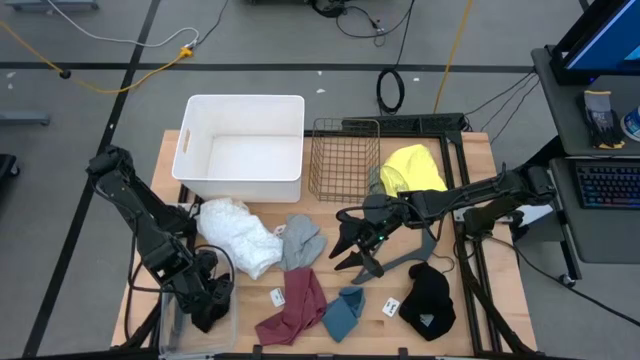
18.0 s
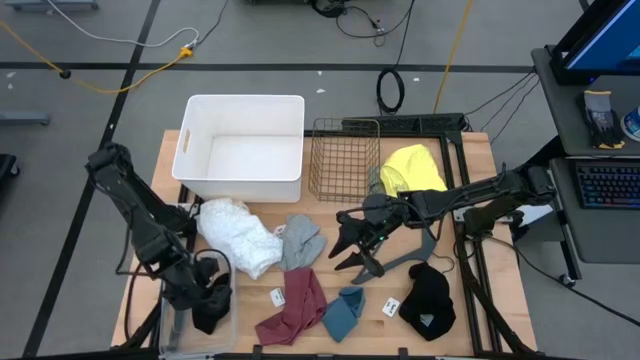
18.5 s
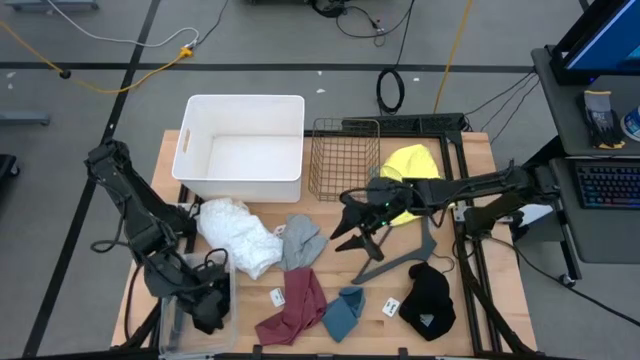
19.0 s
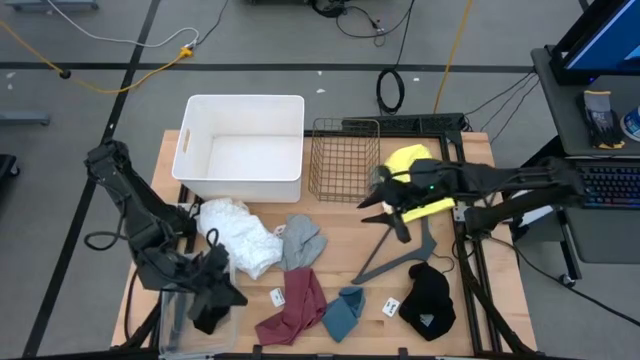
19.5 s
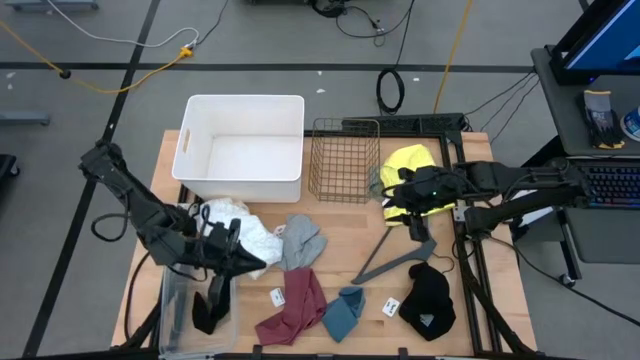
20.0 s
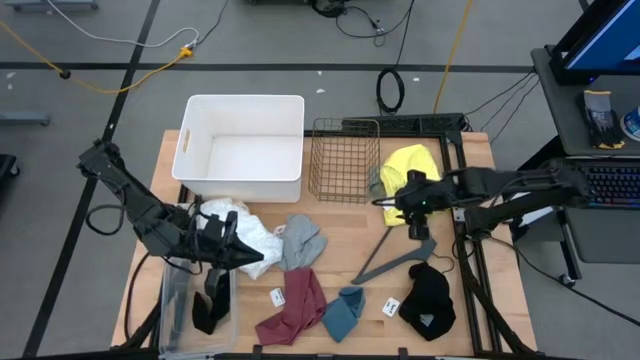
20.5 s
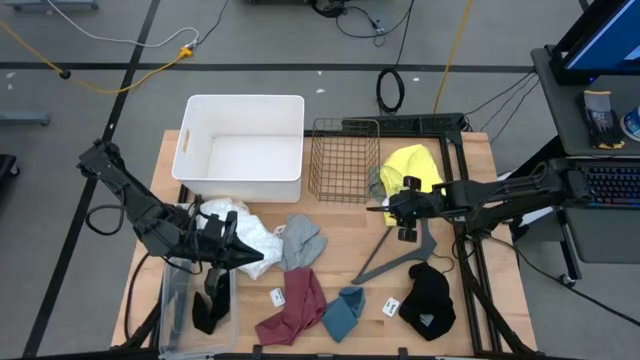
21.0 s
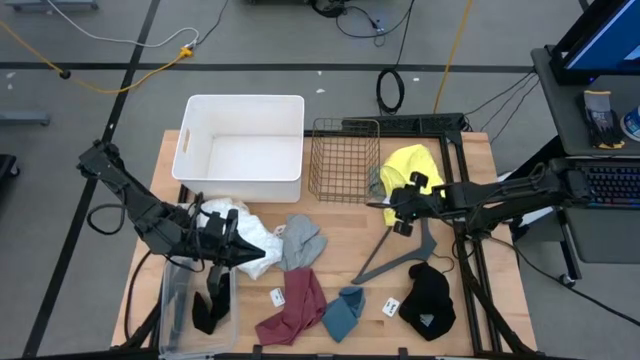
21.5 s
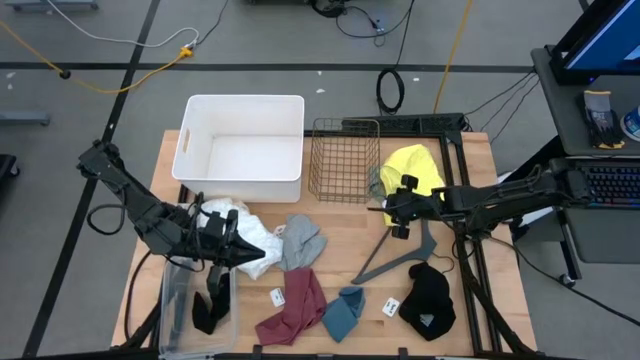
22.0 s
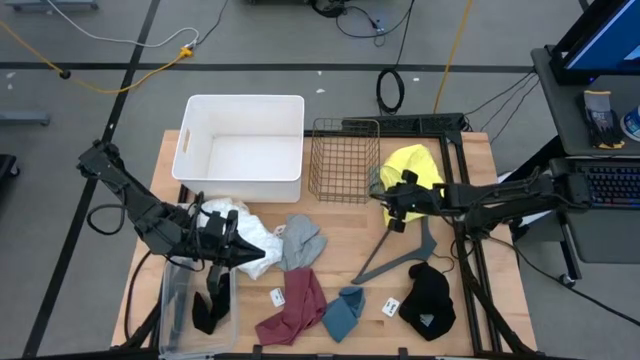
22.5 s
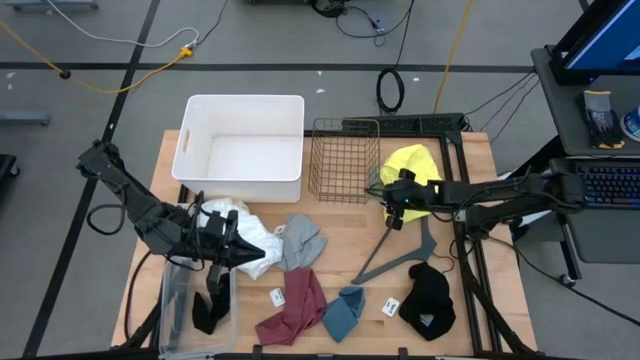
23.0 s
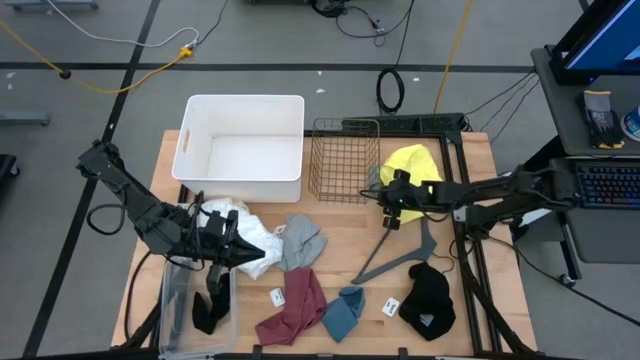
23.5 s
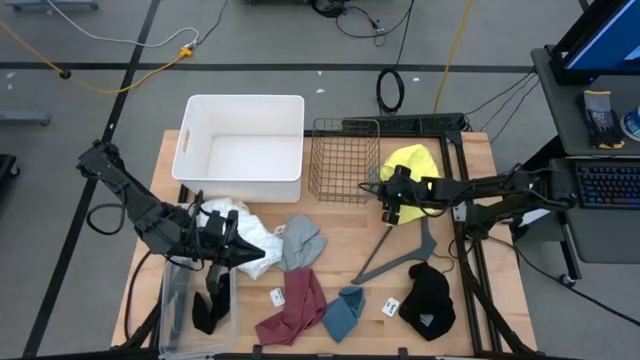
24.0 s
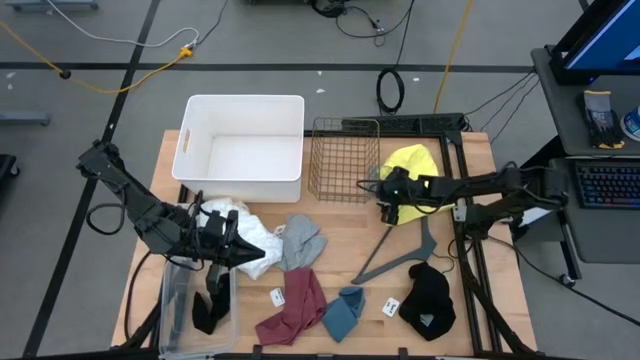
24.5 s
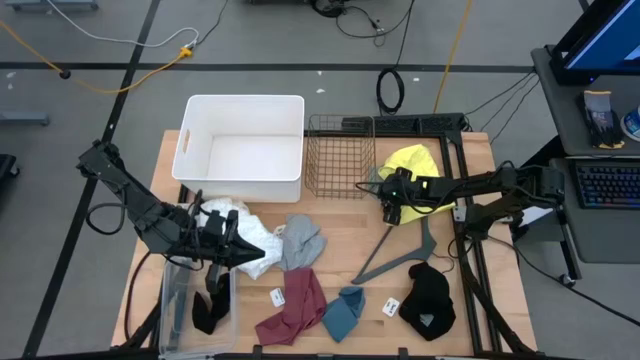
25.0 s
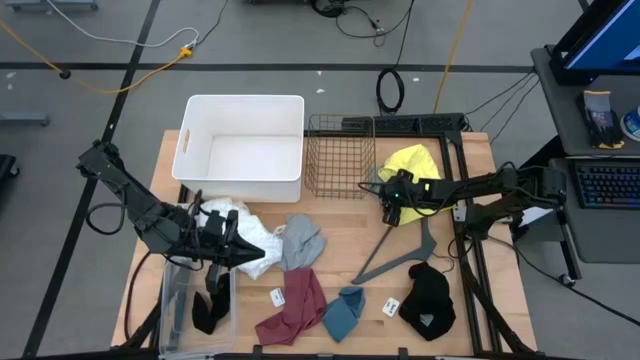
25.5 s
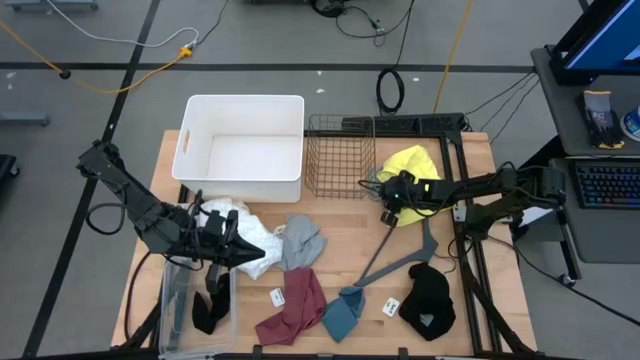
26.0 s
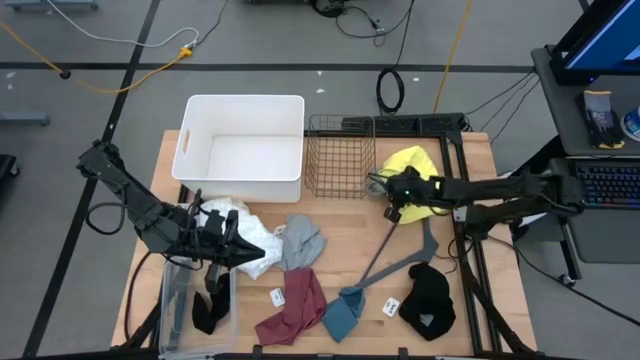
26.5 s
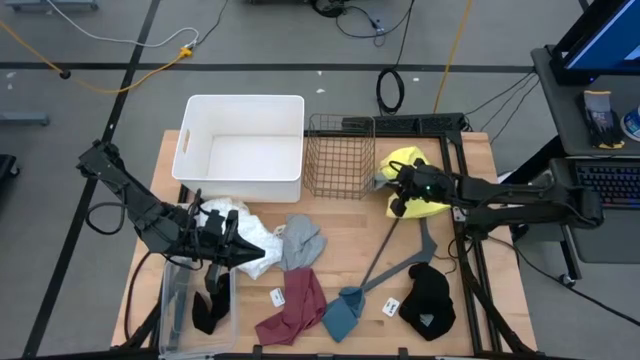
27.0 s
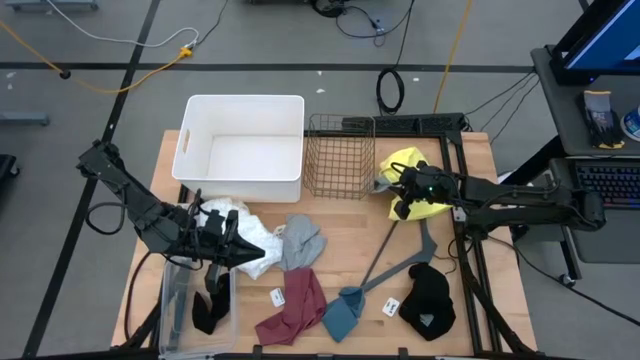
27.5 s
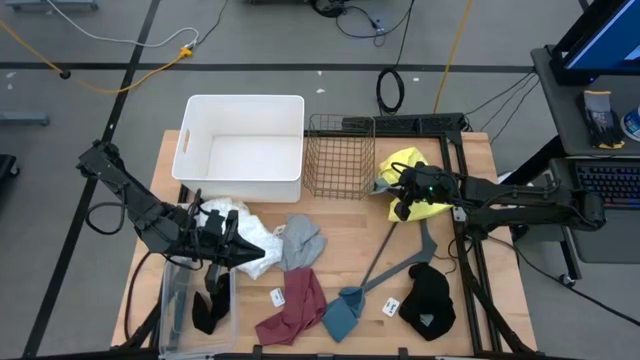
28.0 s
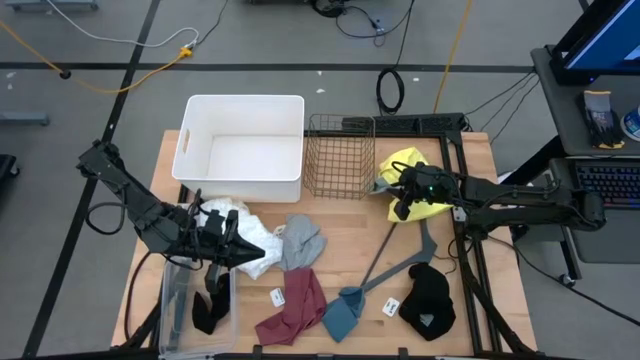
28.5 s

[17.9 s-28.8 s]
Task: Pick & Place Cloths
Put the gray sock into the transparent bin

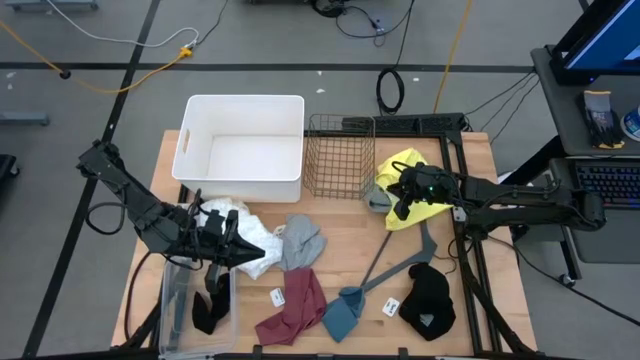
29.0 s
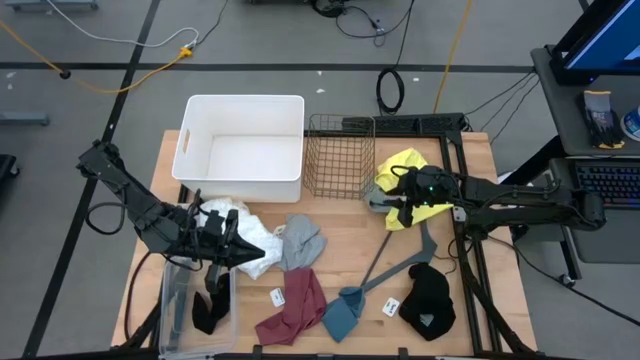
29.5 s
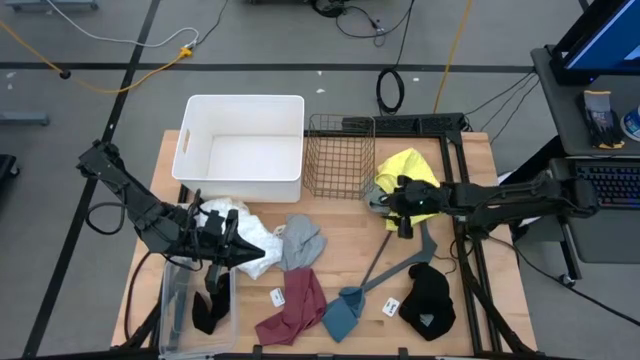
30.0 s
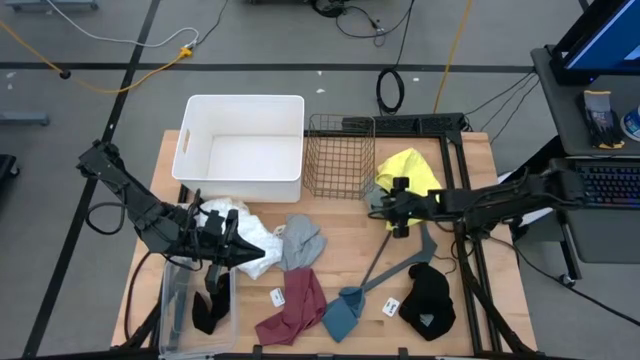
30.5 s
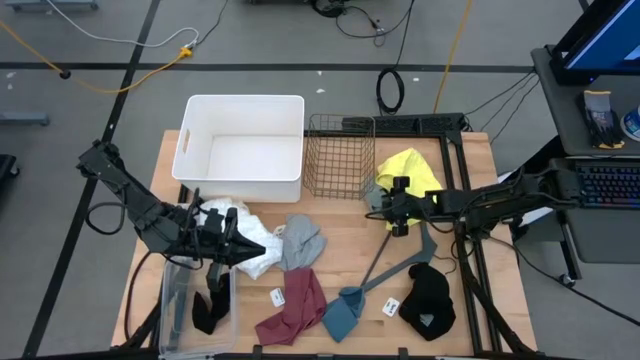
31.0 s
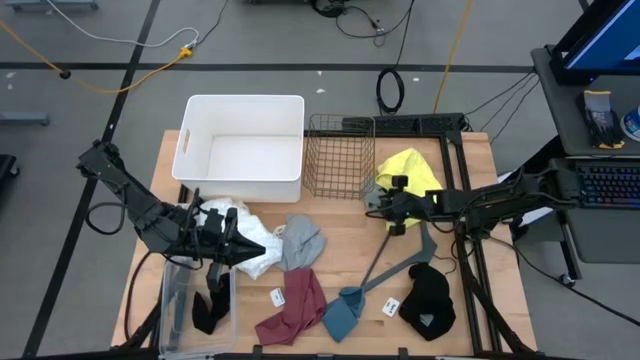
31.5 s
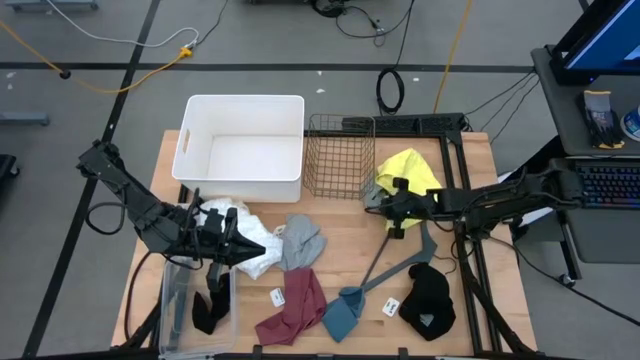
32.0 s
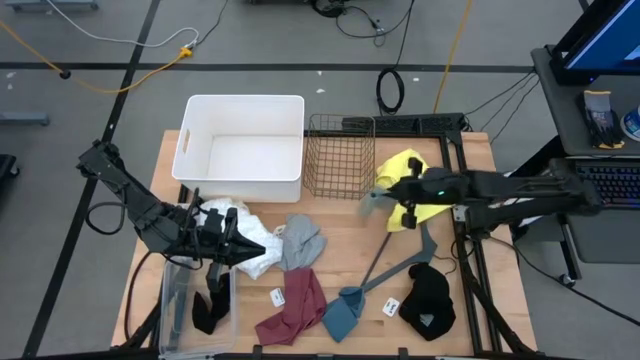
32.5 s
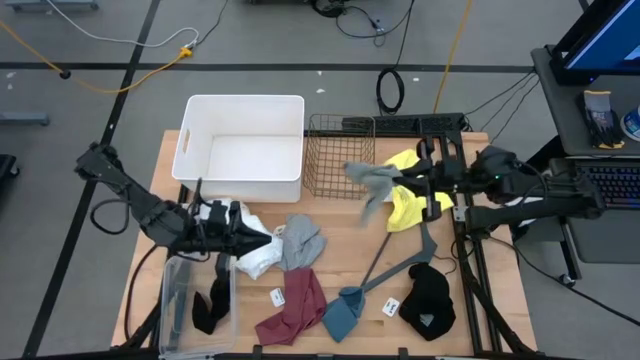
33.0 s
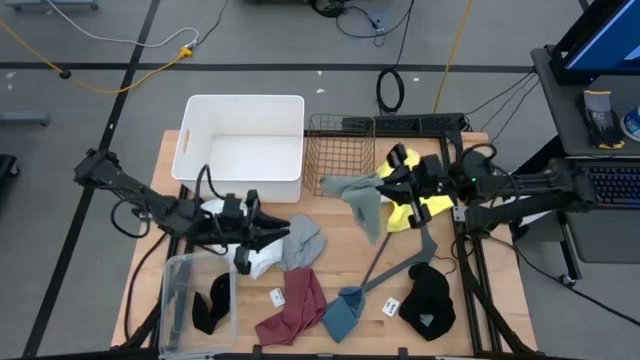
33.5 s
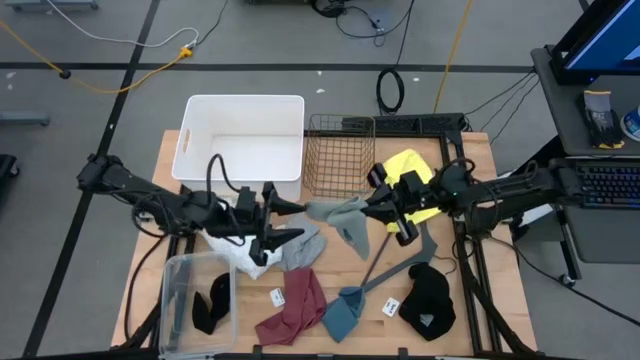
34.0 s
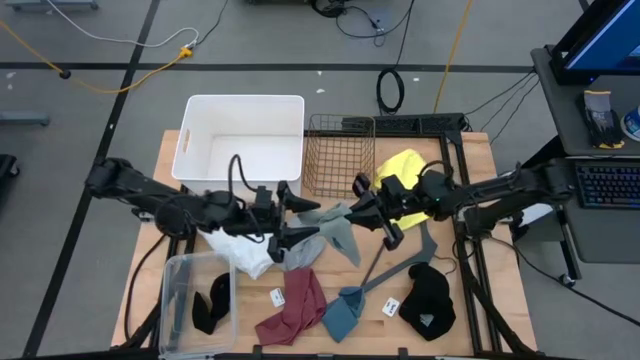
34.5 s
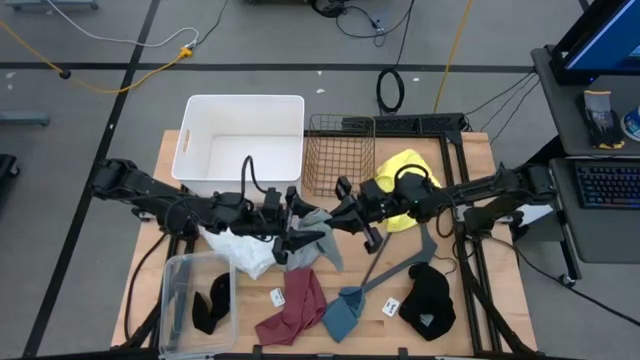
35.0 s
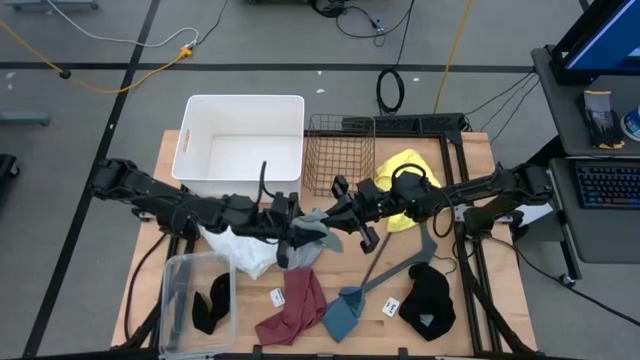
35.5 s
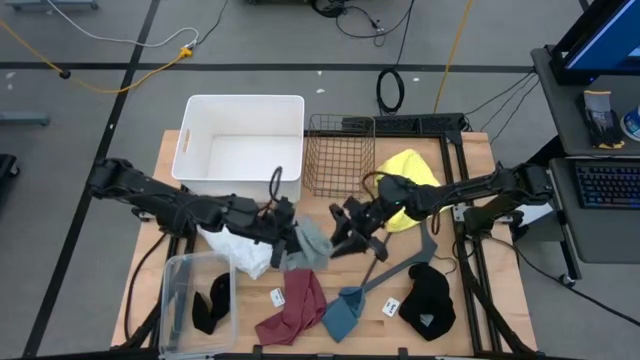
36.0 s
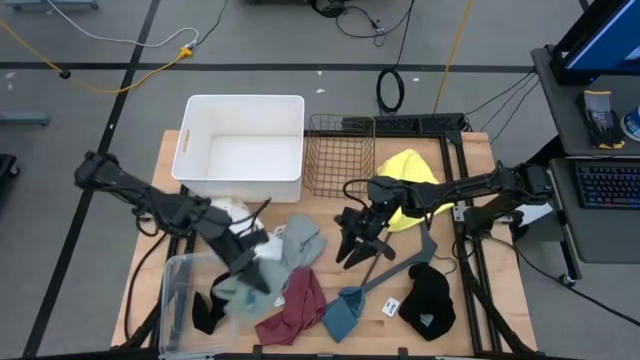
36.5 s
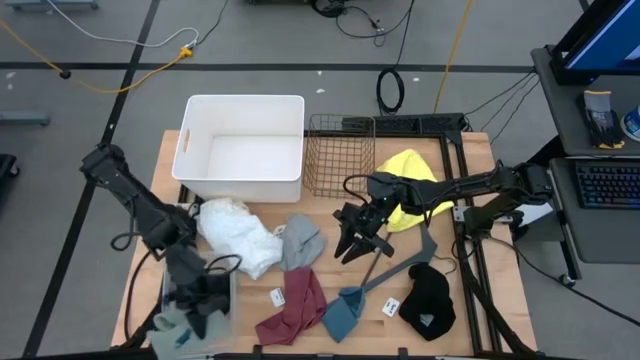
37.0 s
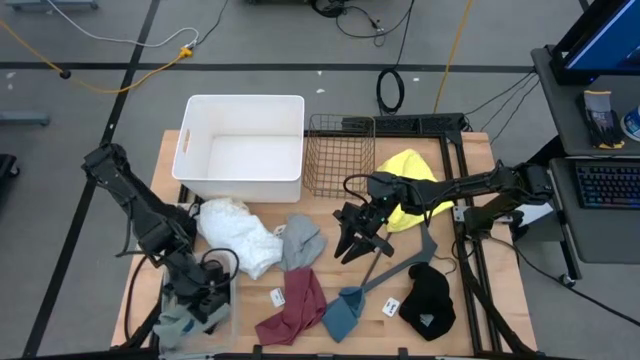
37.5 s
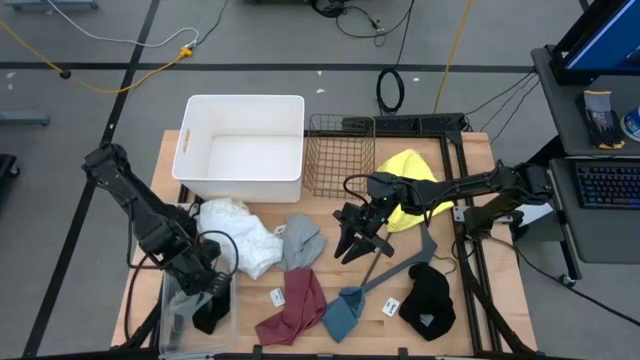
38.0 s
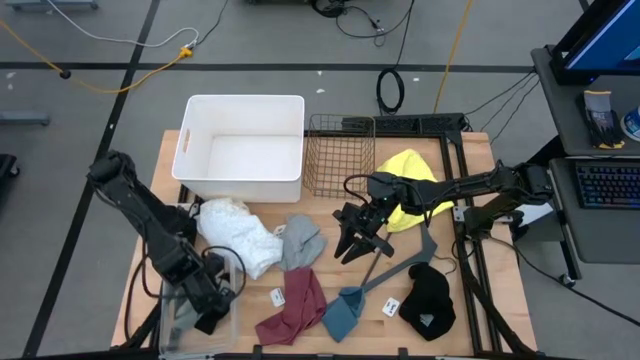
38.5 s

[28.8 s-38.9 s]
Put the gray sock into the transparent bin

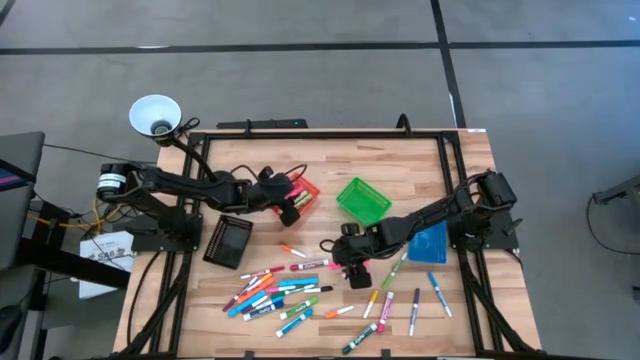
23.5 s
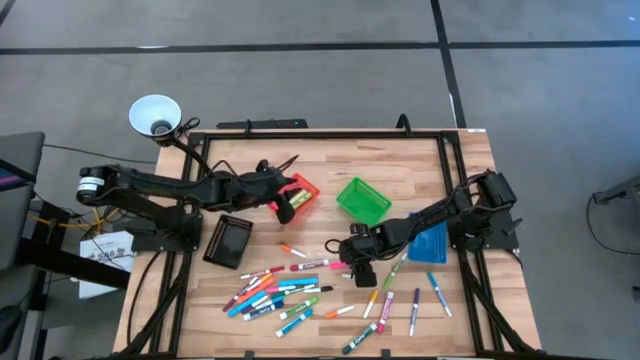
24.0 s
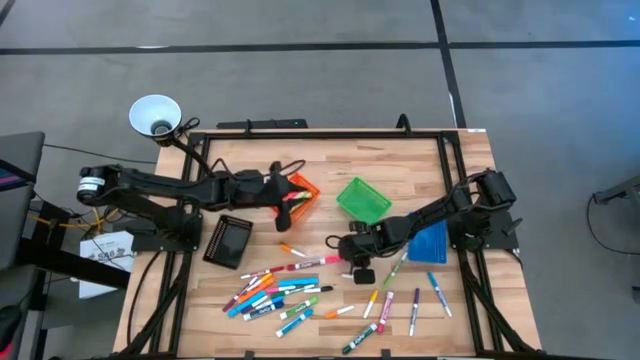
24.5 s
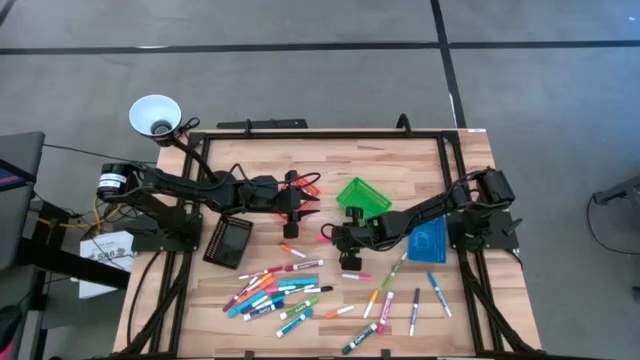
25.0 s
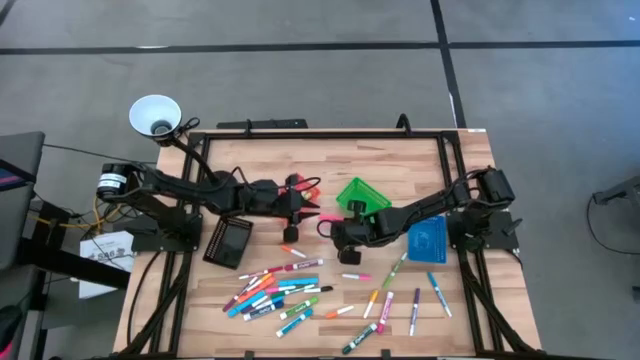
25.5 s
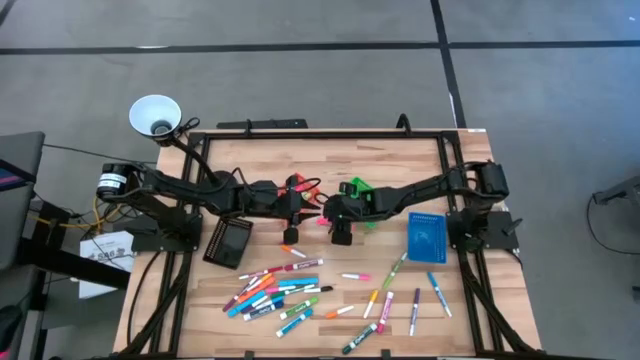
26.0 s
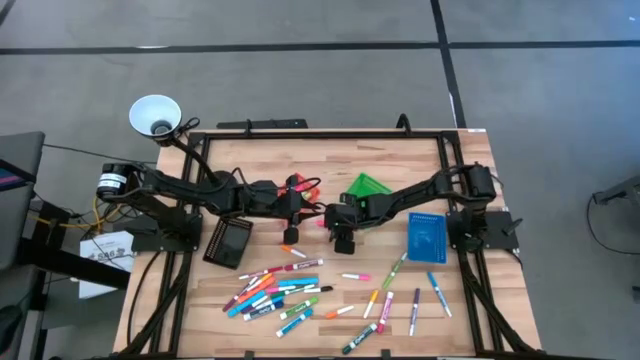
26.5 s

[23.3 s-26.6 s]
Task: Pick & Place Markers
Put the pink highlighter pen into the orange bin
